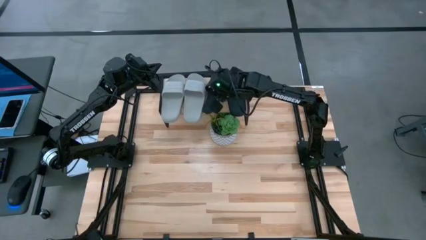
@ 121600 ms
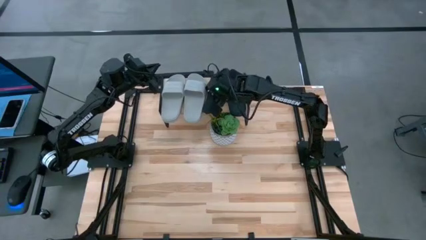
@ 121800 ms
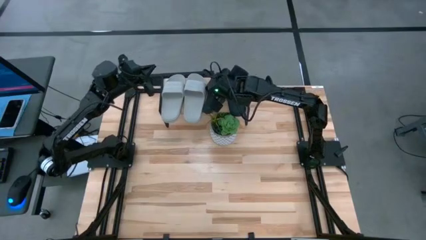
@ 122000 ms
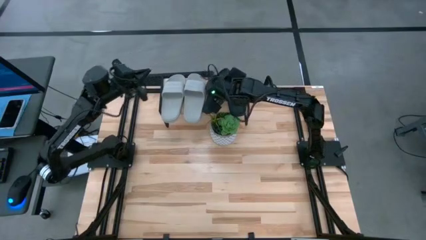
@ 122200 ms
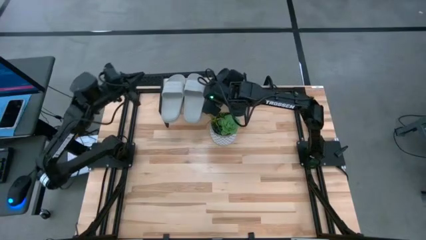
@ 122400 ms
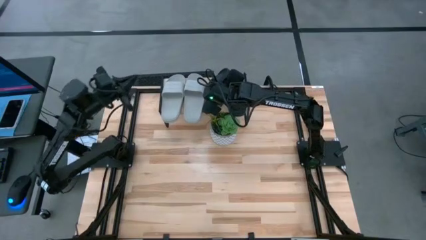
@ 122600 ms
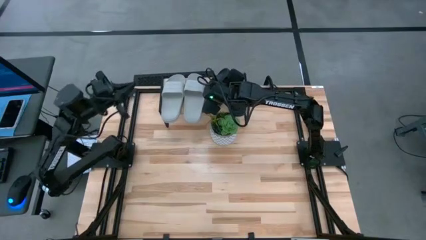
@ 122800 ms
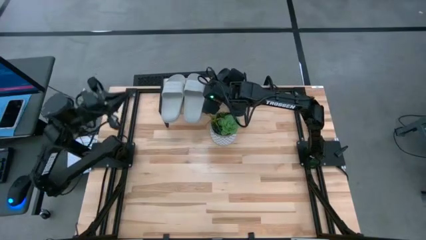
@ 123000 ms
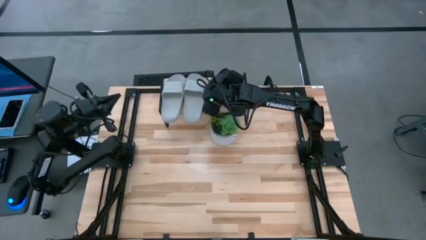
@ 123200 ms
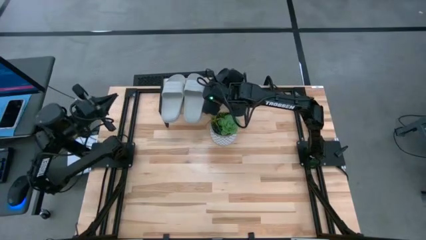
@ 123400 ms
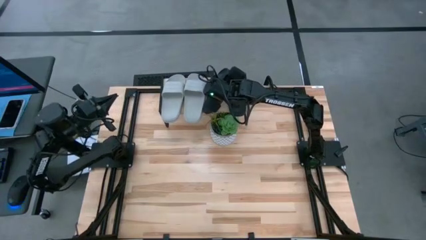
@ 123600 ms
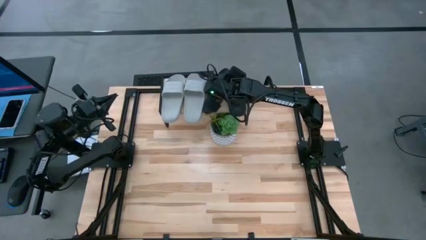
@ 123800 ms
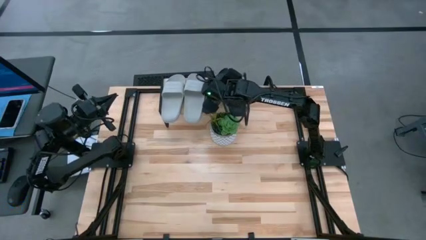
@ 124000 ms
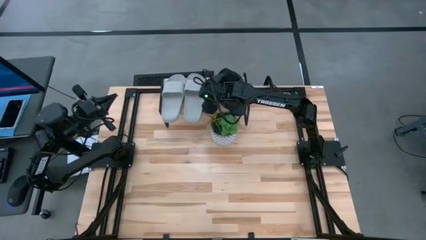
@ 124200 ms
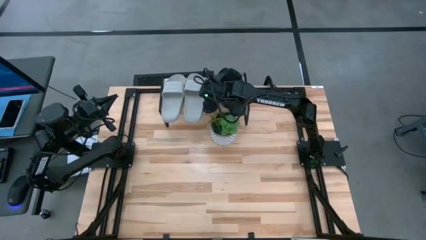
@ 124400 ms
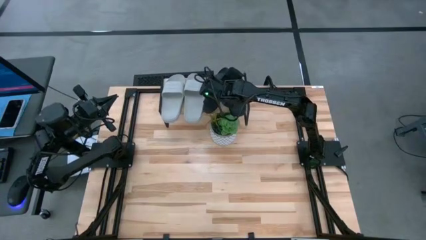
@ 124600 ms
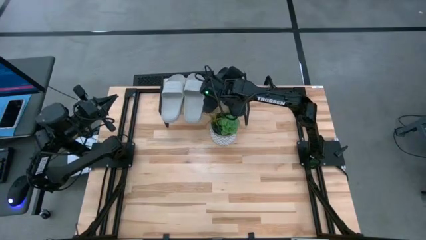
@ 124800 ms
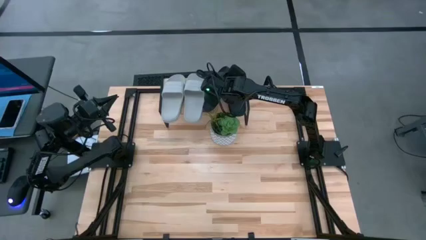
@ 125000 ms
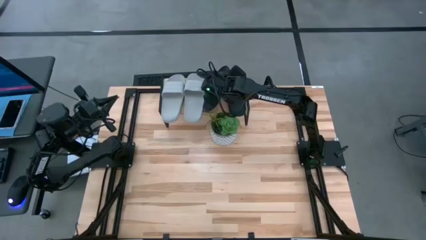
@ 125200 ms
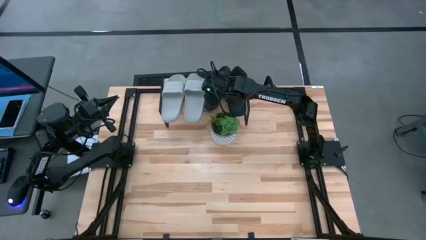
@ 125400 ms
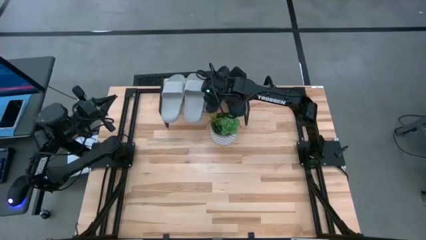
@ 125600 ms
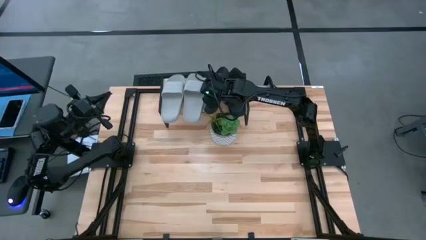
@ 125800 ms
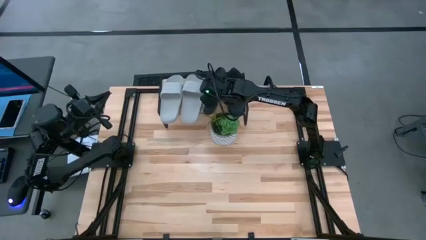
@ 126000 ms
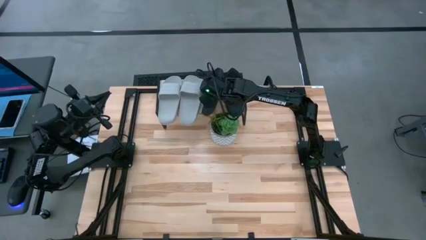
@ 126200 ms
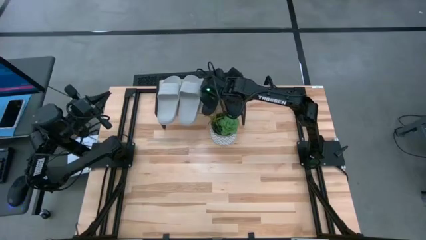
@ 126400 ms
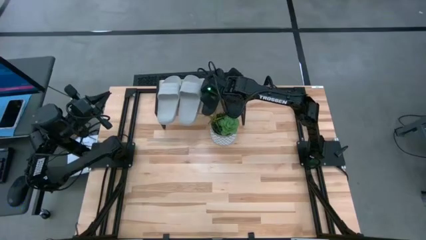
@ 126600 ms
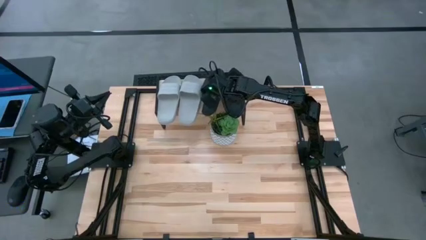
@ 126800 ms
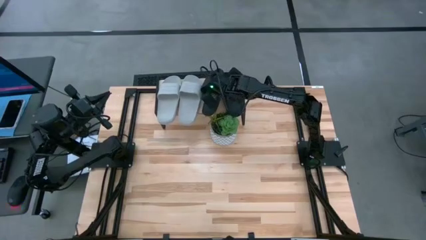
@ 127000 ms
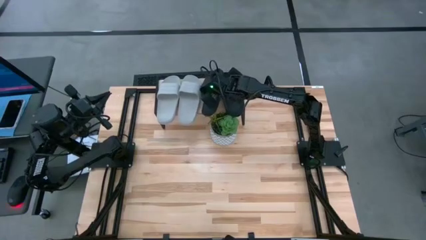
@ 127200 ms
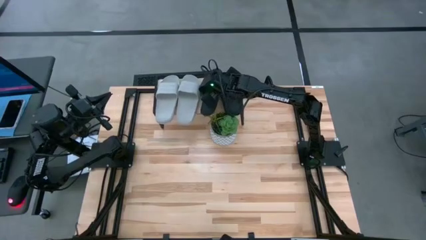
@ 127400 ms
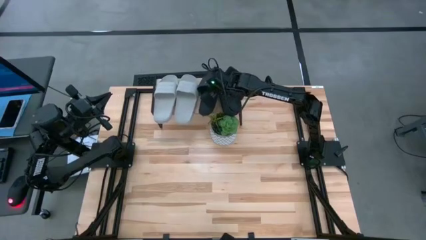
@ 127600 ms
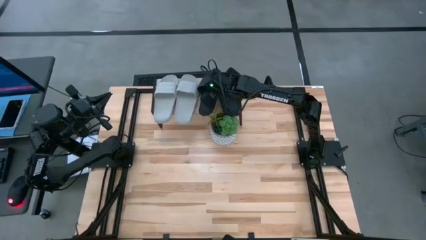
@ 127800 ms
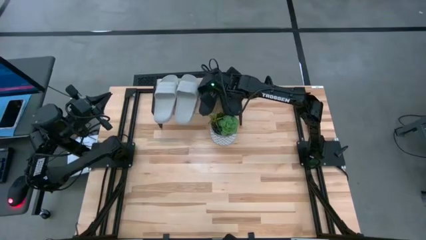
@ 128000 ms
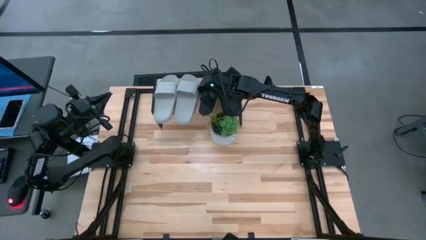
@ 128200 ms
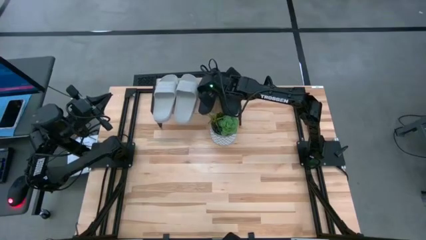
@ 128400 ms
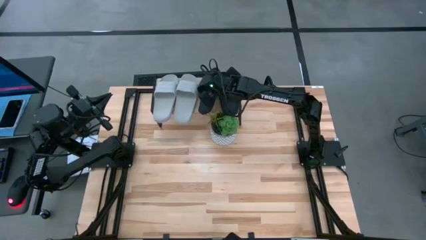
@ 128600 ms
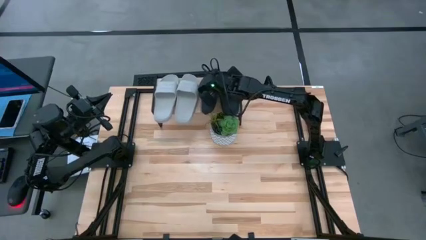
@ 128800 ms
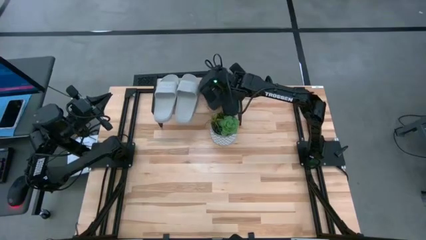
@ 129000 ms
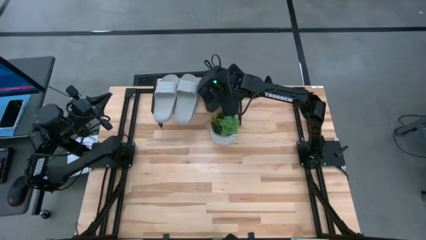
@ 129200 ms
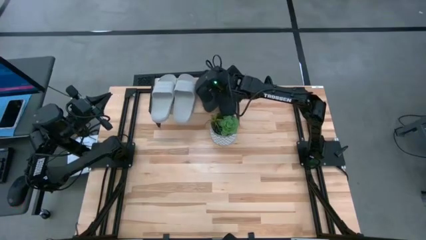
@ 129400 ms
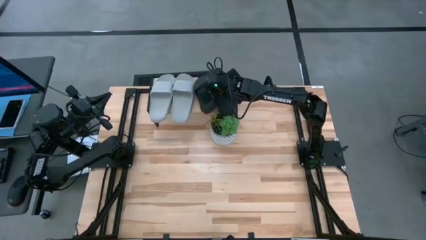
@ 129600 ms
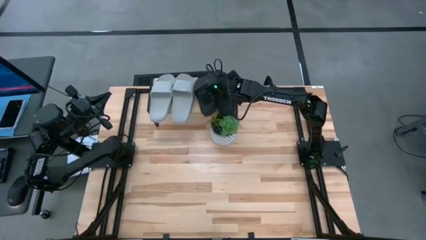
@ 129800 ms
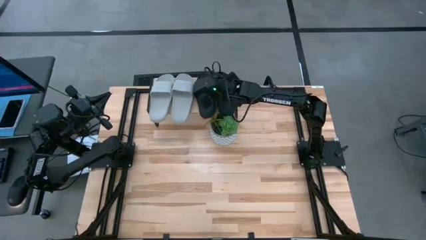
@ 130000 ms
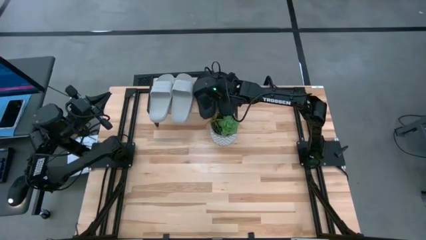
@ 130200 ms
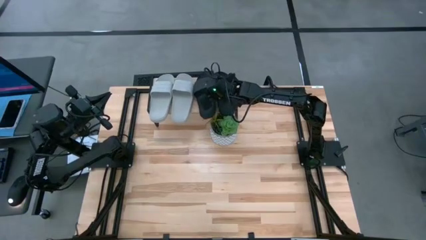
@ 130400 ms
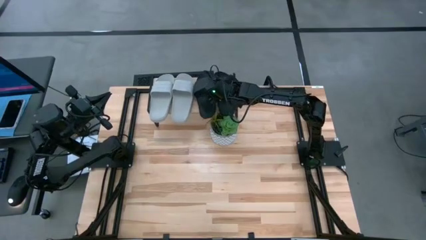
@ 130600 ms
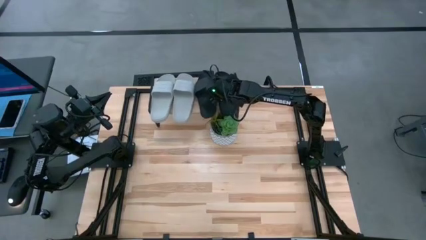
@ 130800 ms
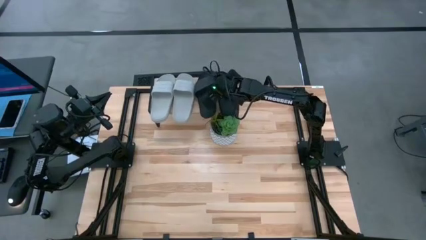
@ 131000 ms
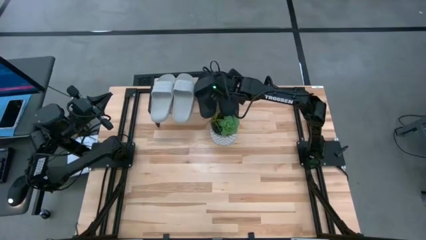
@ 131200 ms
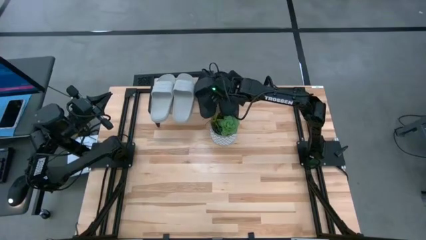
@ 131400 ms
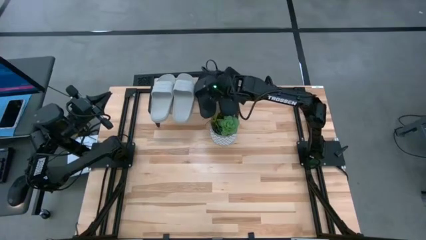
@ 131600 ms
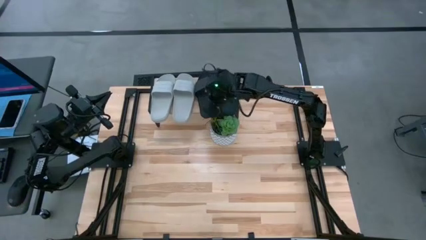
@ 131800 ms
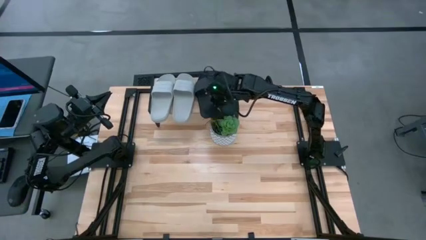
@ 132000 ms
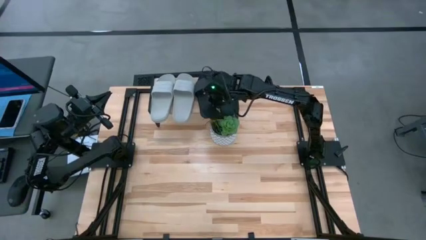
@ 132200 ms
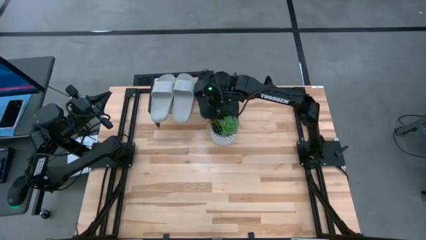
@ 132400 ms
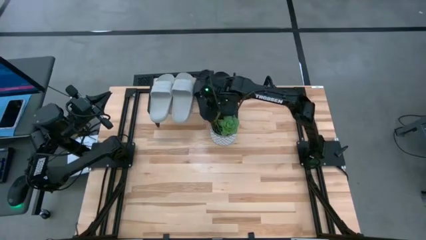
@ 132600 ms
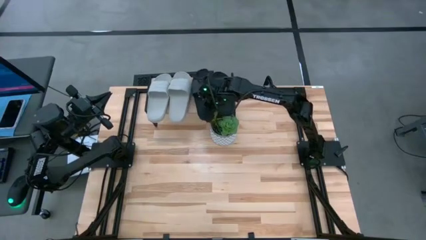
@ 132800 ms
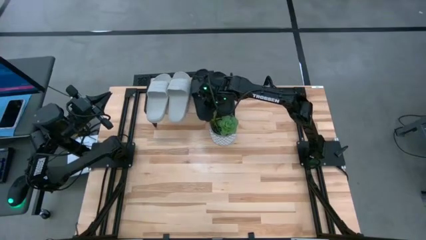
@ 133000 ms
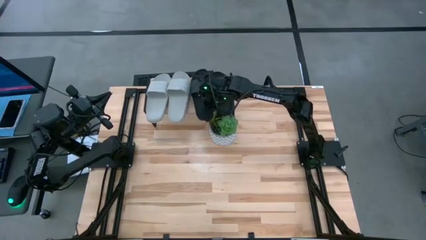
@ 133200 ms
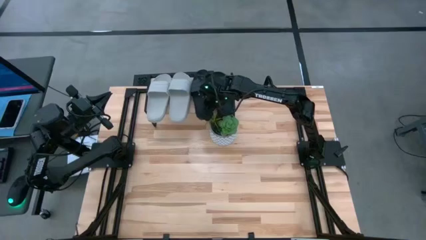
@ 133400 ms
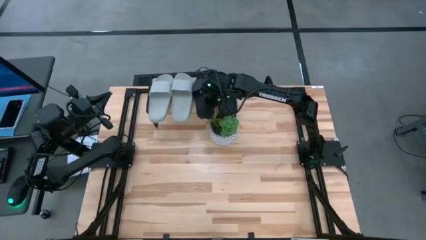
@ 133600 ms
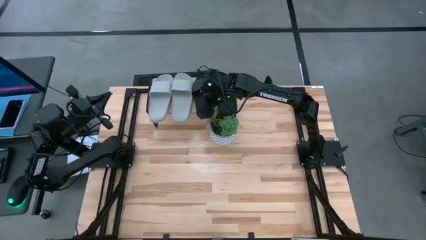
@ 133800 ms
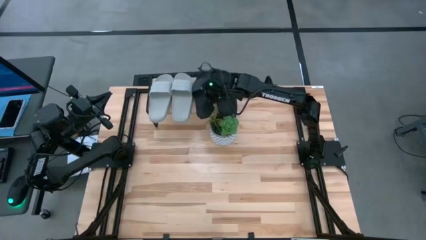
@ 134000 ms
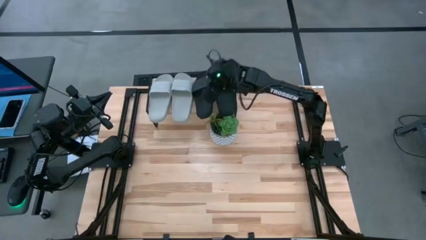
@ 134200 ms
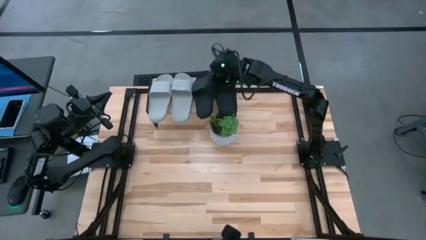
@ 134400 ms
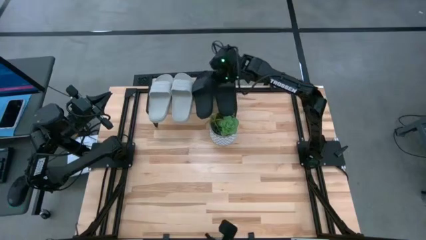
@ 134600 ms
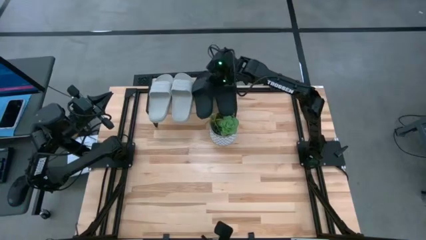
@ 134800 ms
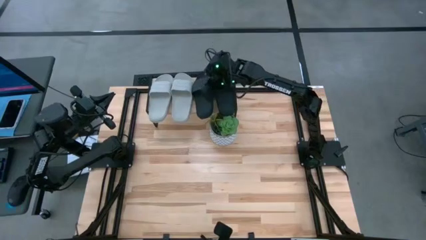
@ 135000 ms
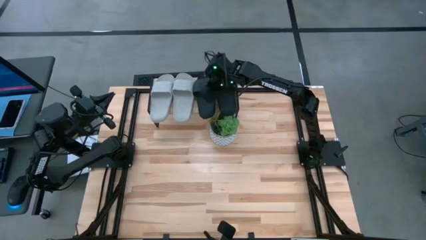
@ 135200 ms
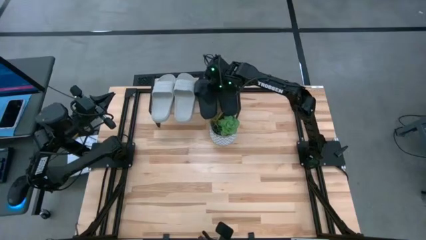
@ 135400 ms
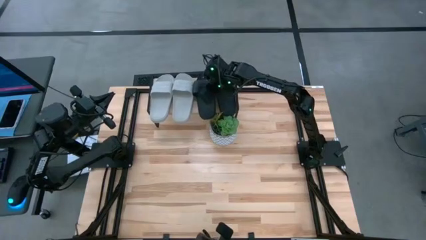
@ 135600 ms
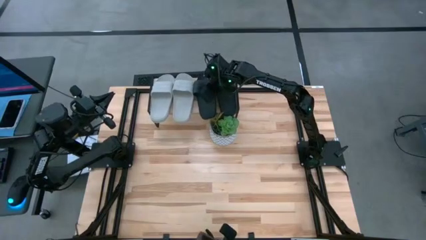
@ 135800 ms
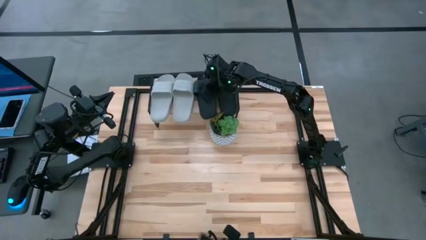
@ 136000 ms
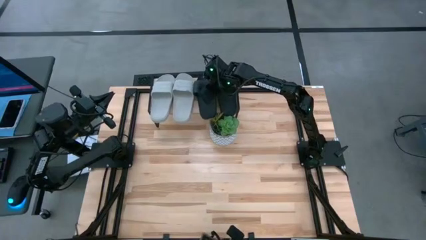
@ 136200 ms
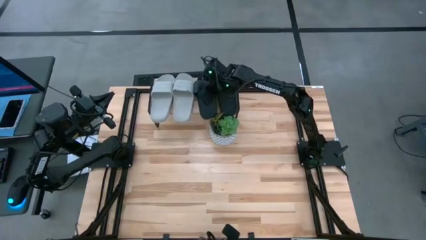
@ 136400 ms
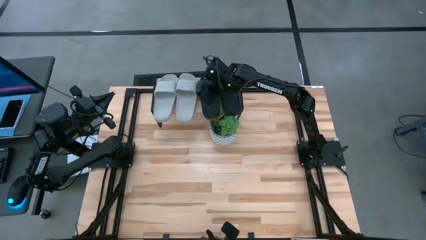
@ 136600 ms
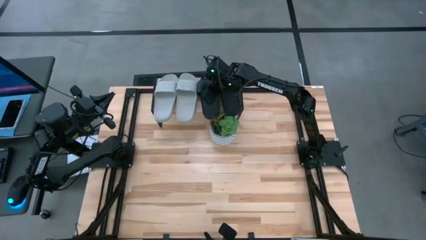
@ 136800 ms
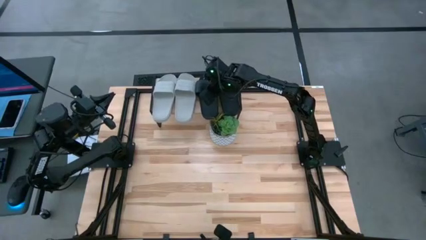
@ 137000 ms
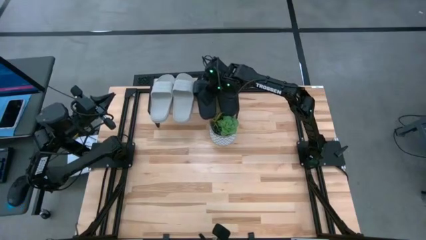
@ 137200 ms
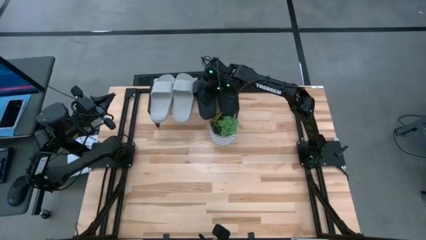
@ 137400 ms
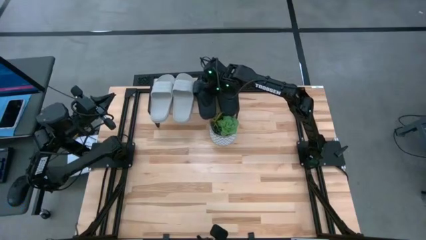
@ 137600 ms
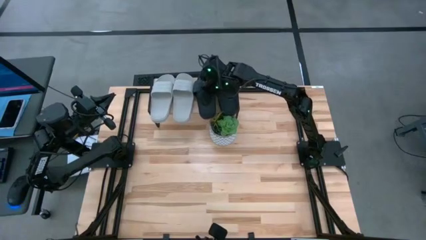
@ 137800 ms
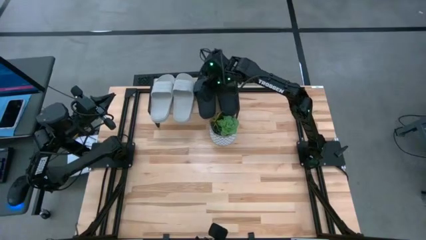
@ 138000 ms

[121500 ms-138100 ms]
Task: Pick and place slides into the shelf
Adjust the slides on the shelf
